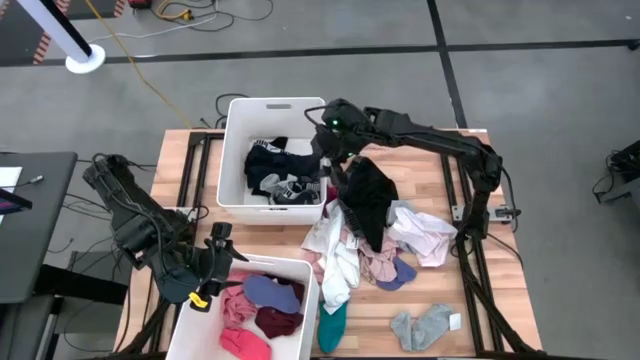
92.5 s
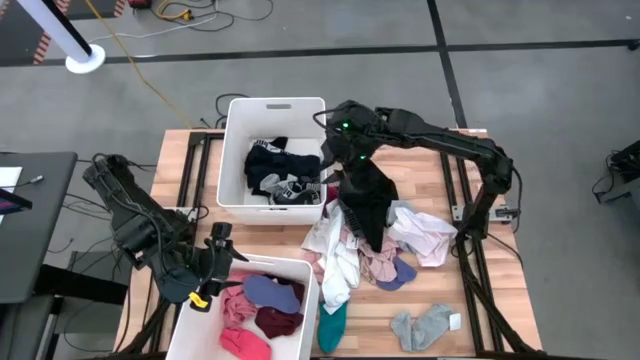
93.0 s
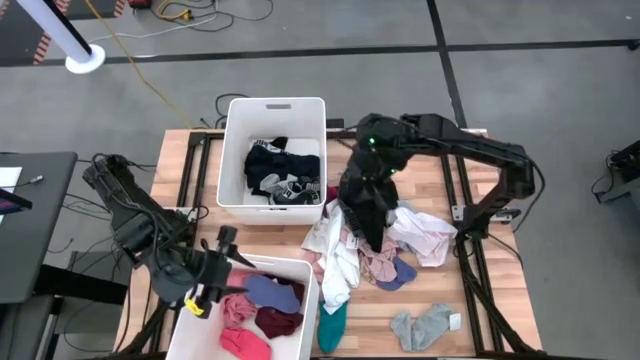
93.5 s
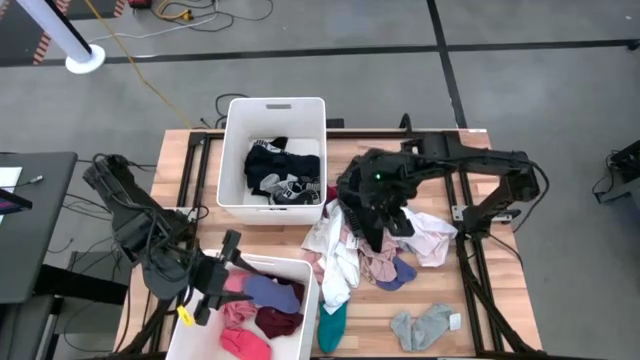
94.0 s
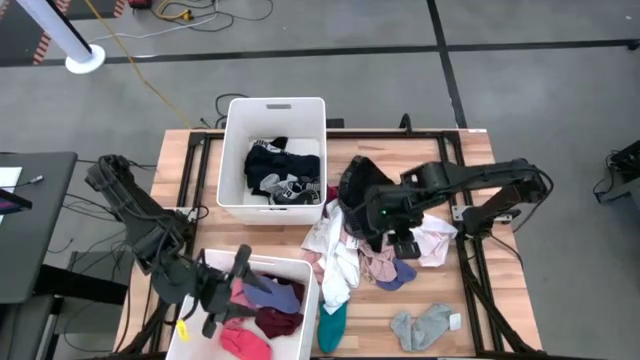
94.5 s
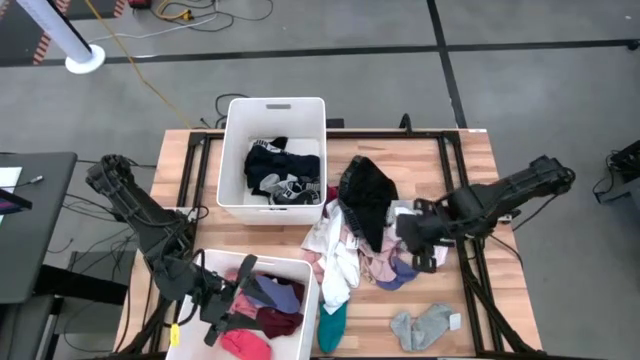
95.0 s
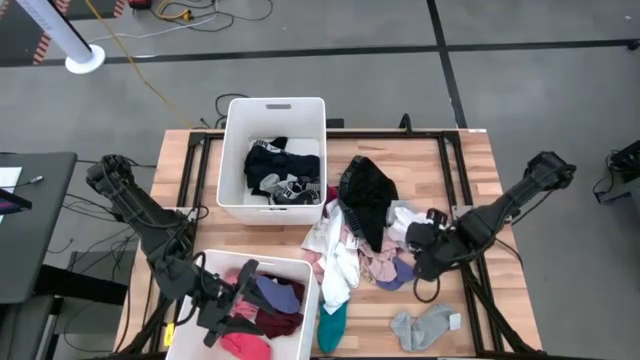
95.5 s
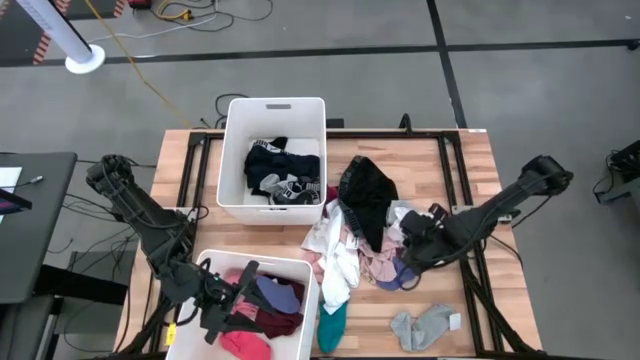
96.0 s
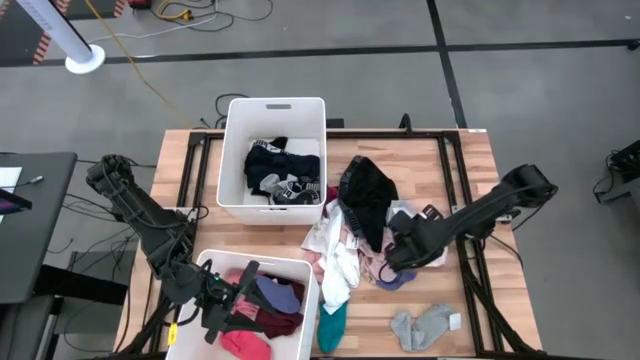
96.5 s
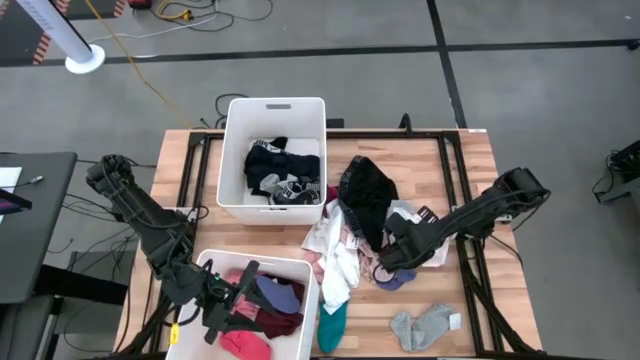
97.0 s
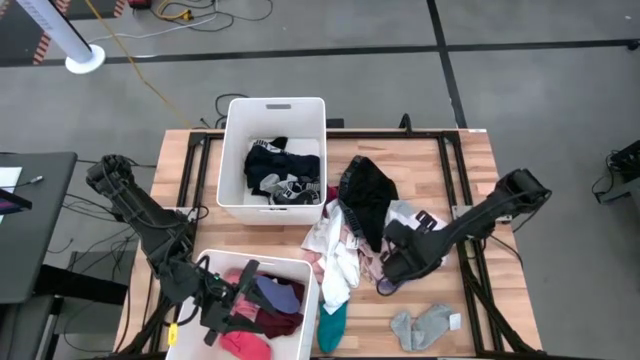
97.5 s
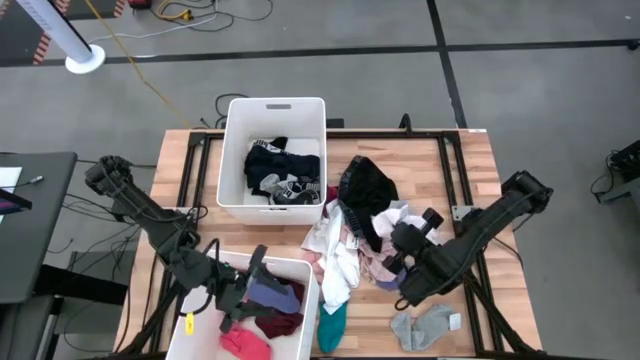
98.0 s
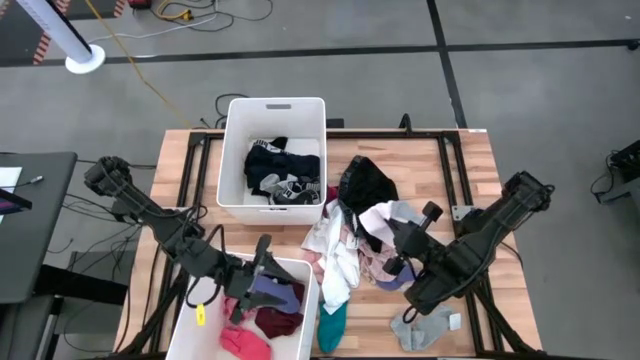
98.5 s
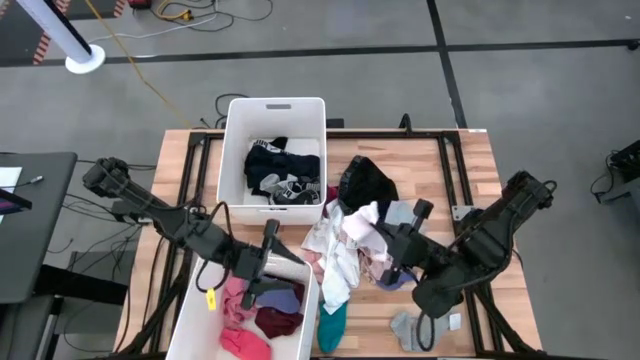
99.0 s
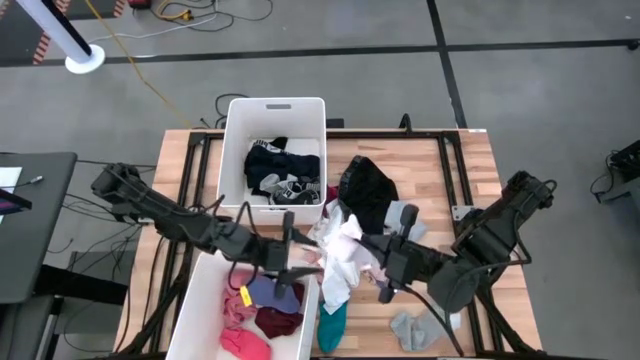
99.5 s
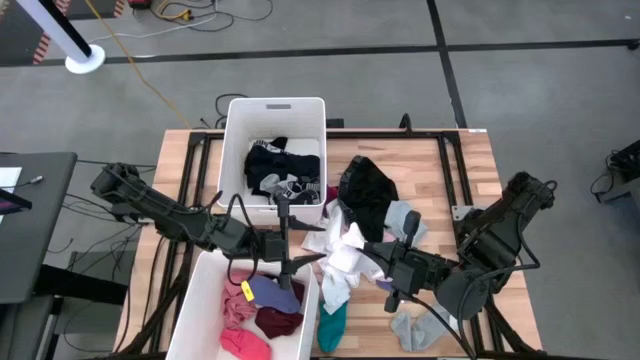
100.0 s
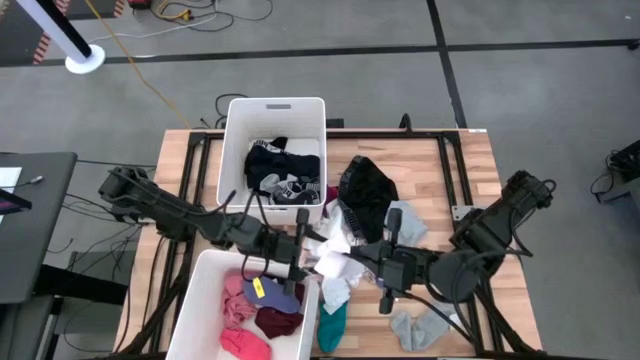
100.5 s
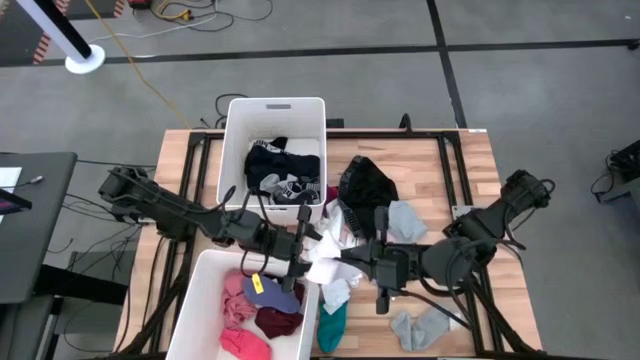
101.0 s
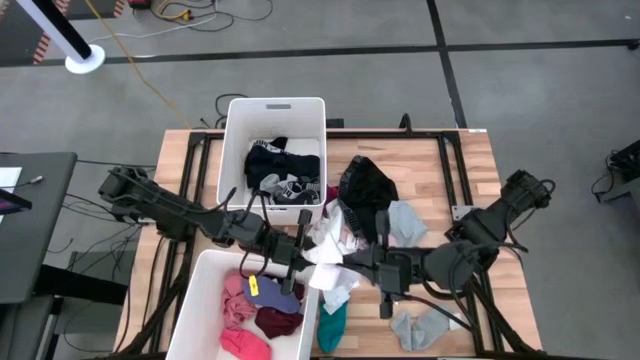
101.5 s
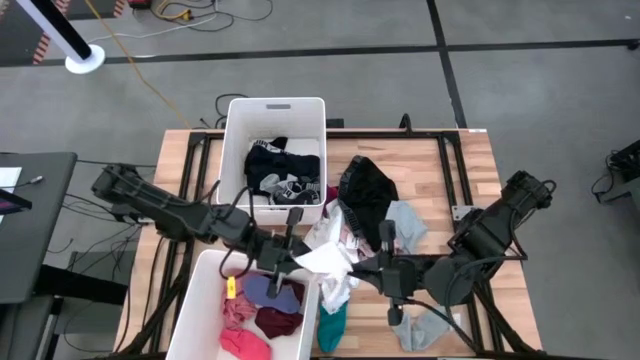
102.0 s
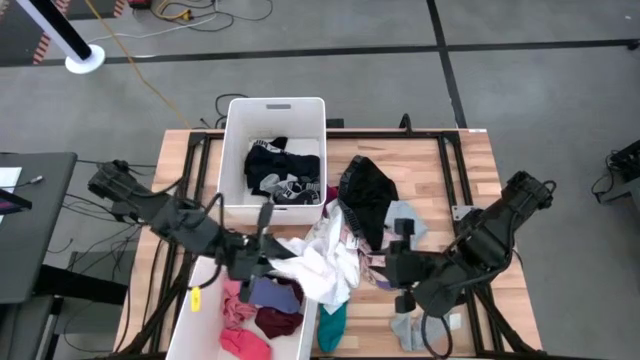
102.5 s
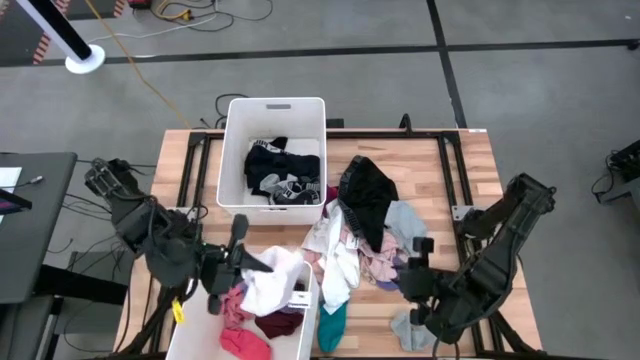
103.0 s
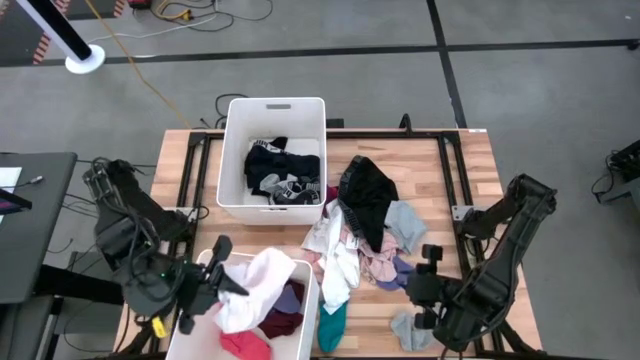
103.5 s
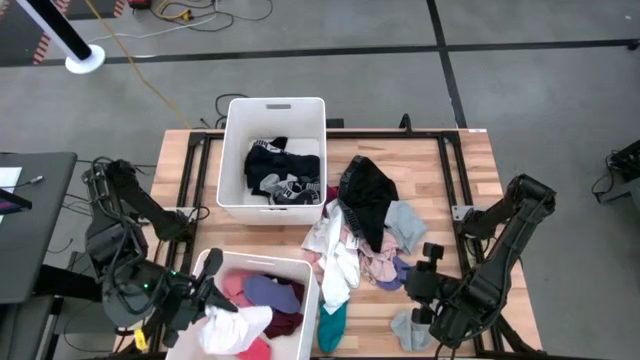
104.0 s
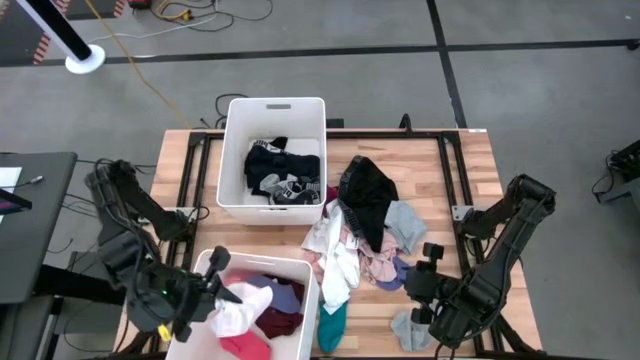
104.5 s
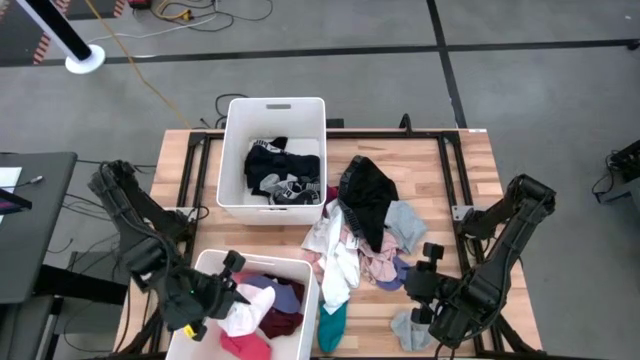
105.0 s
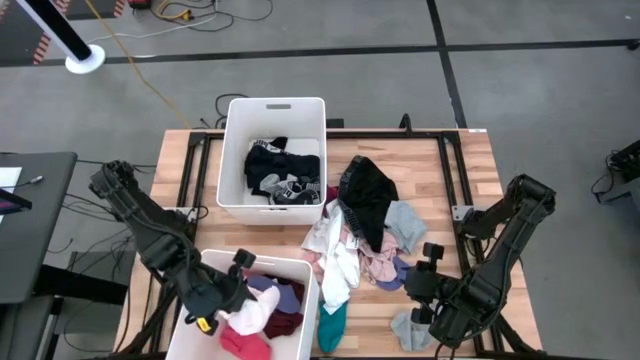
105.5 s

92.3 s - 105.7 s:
Task: Sort clothes
Put the white underwear into the bottom white laundry bin
